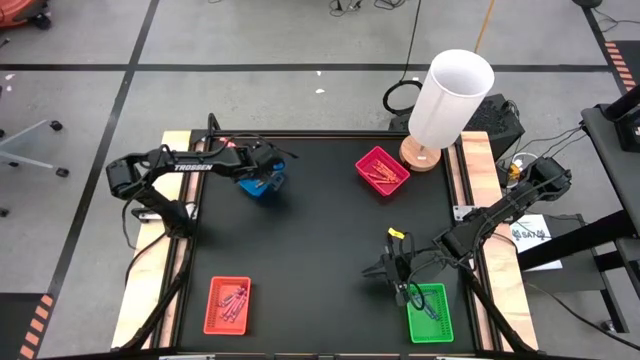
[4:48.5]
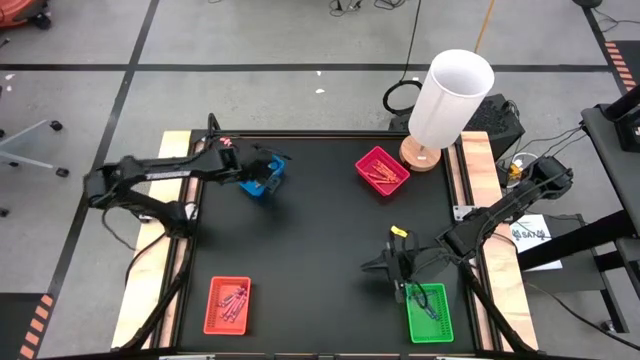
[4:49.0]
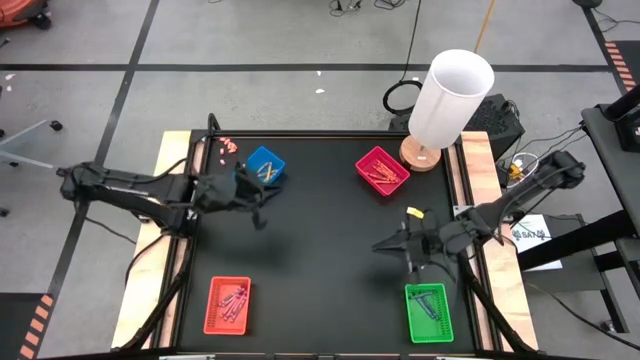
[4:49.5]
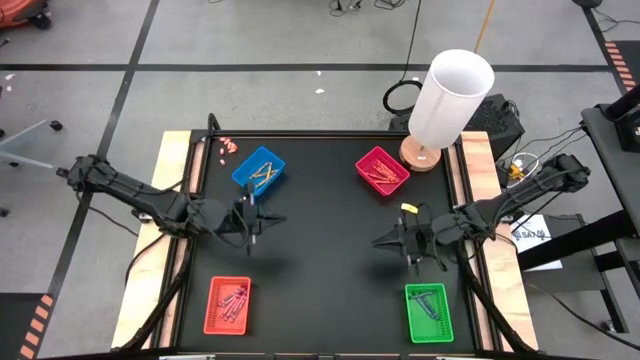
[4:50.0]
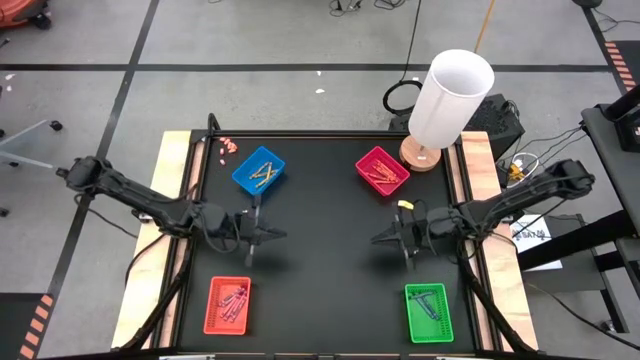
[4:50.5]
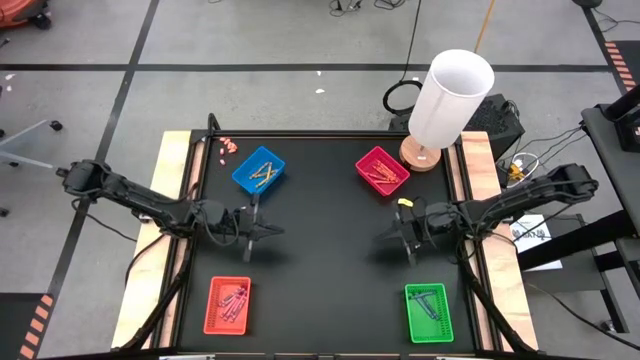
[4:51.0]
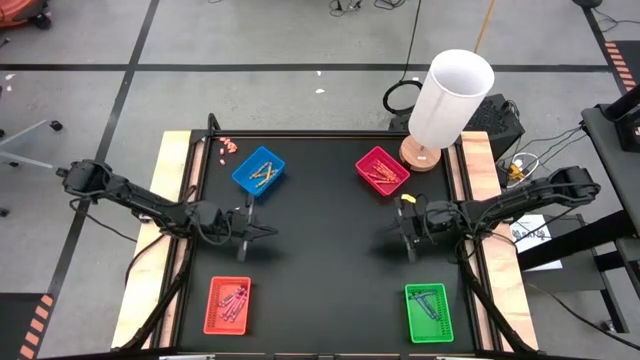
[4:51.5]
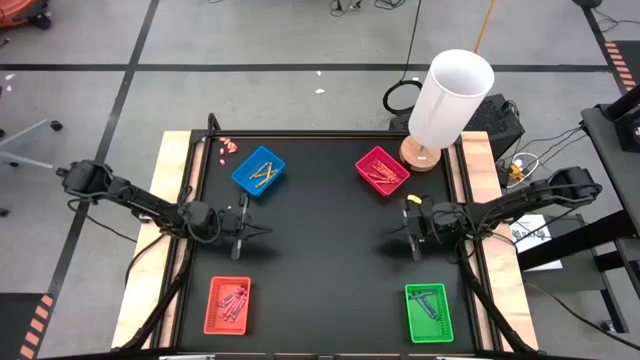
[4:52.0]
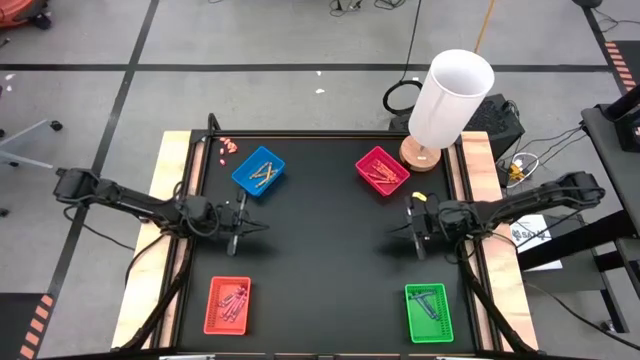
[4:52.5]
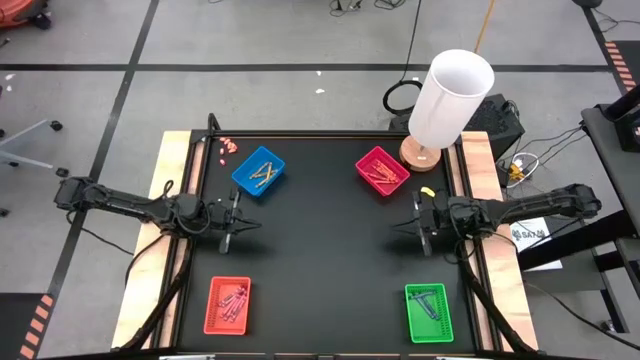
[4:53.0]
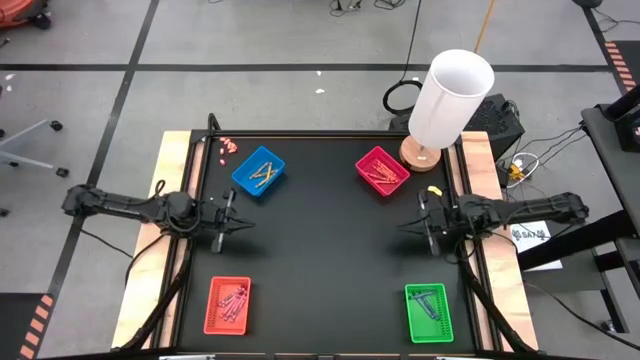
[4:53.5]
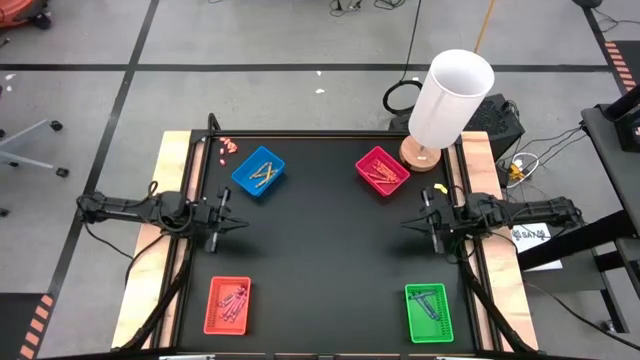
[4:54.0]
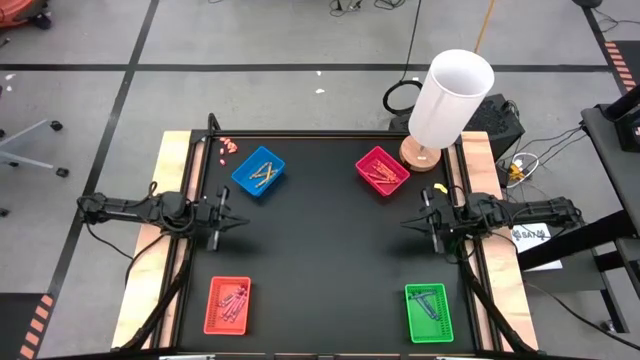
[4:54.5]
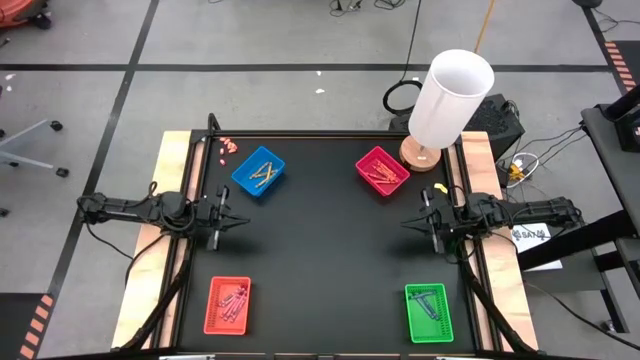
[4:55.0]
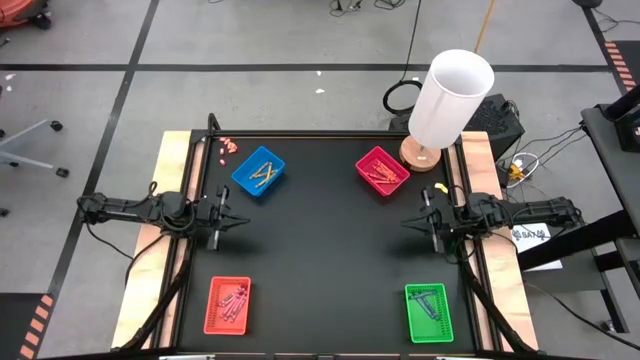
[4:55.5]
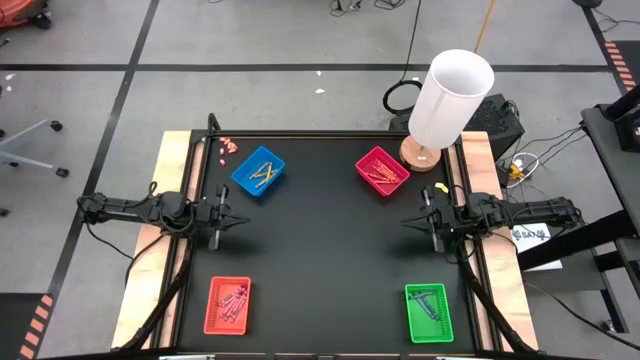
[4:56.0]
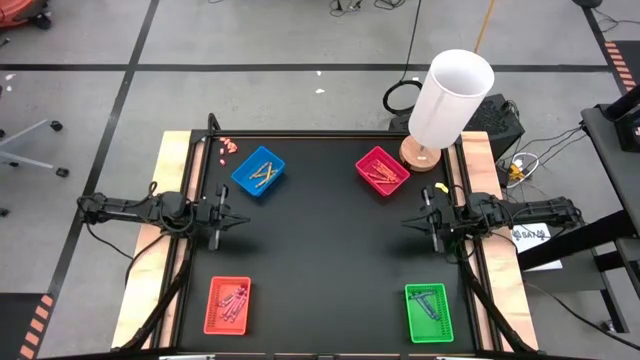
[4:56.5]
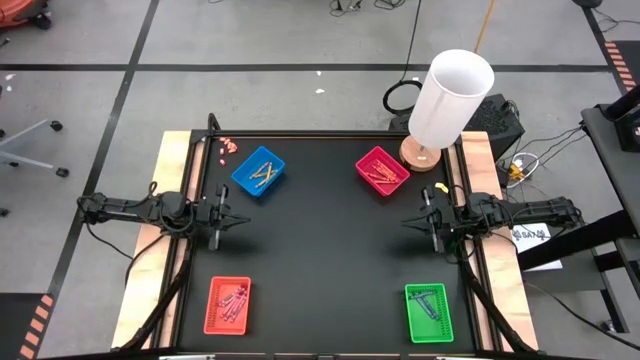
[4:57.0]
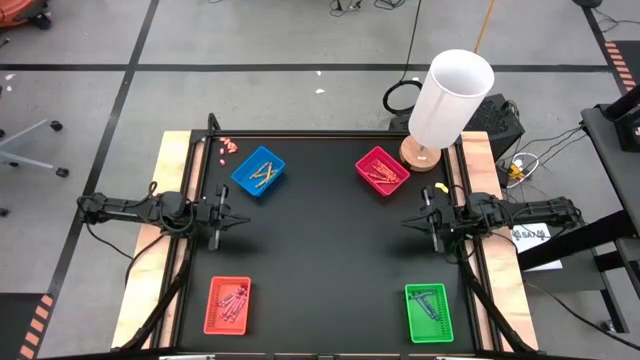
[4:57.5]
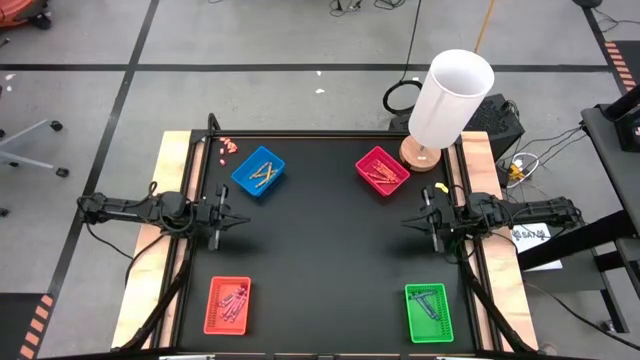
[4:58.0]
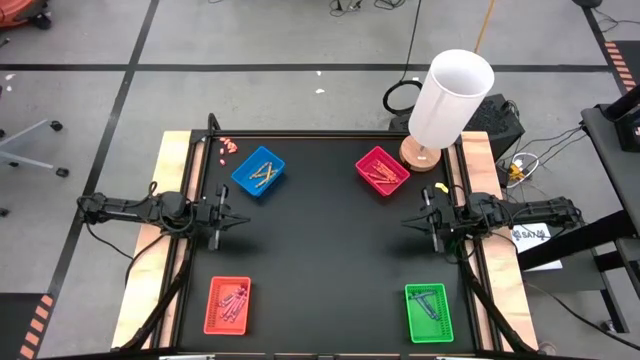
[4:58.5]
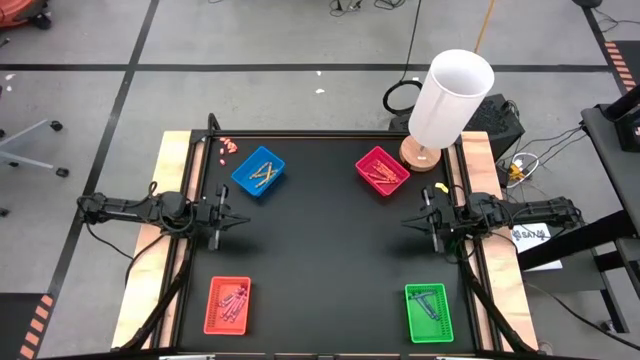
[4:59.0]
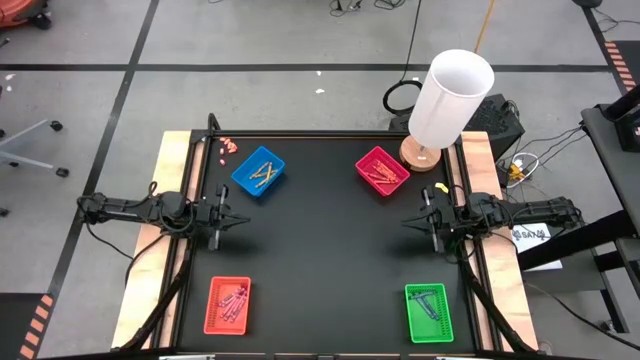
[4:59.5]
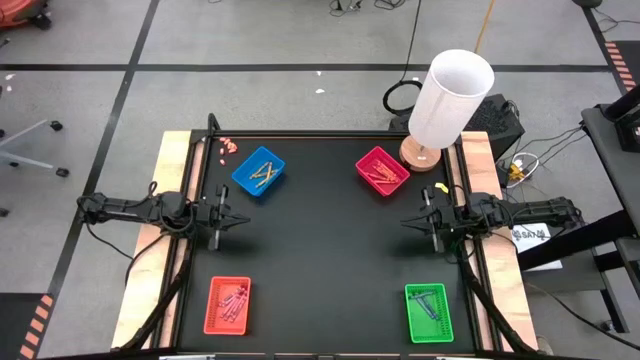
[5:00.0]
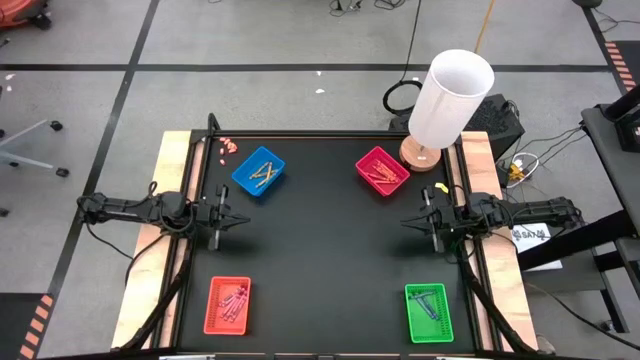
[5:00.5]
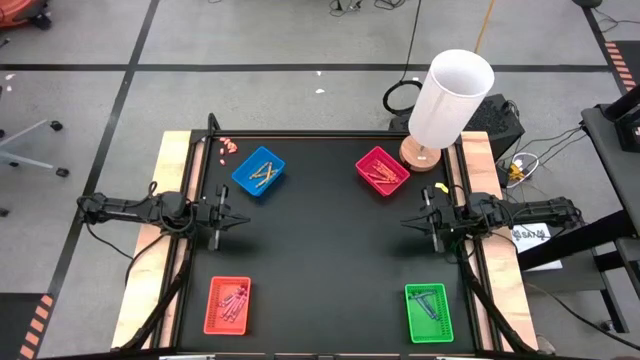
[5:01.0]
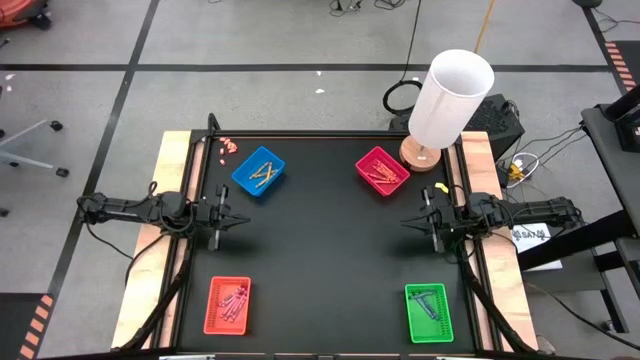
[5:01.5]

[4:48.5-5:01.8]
Task: Sort crayons
Return to Home Position

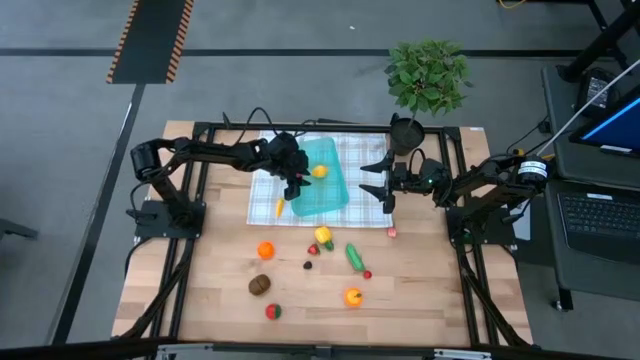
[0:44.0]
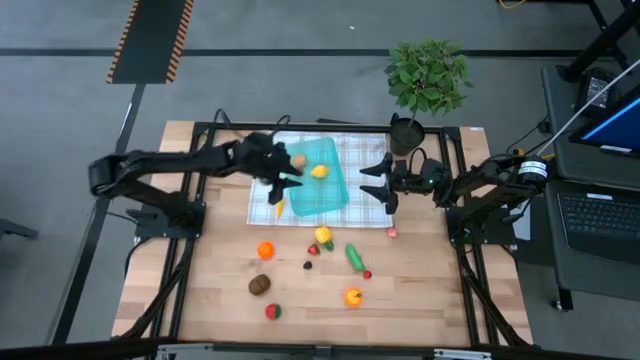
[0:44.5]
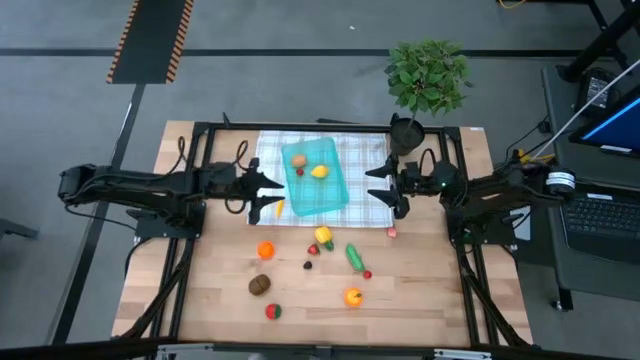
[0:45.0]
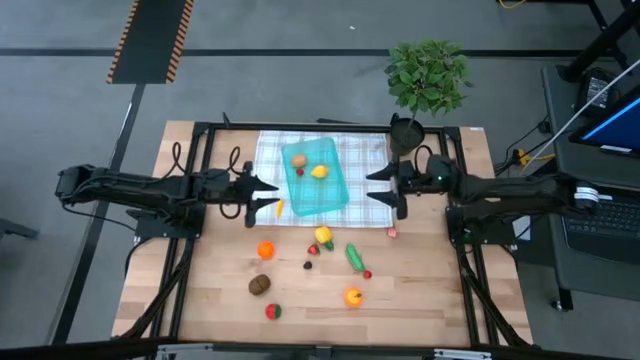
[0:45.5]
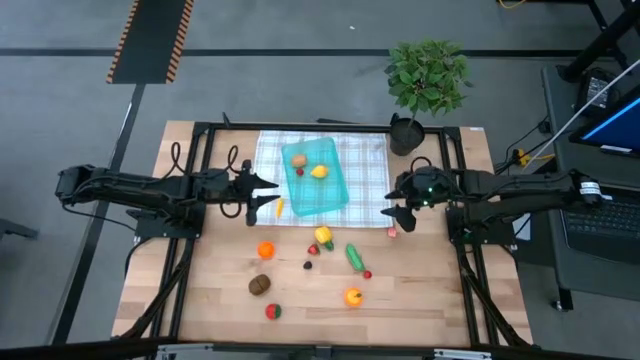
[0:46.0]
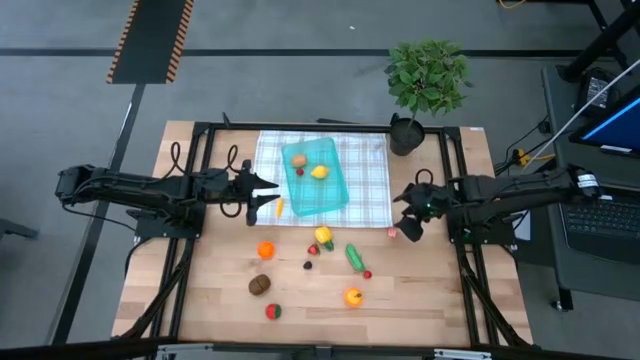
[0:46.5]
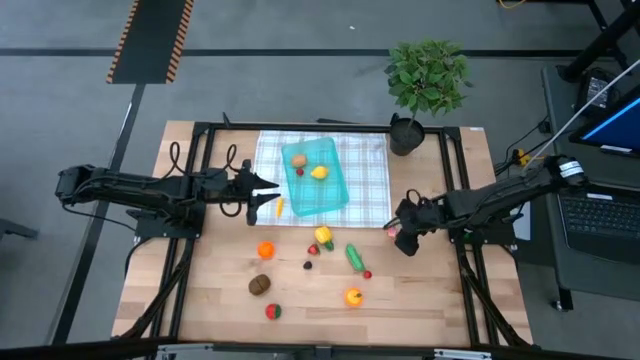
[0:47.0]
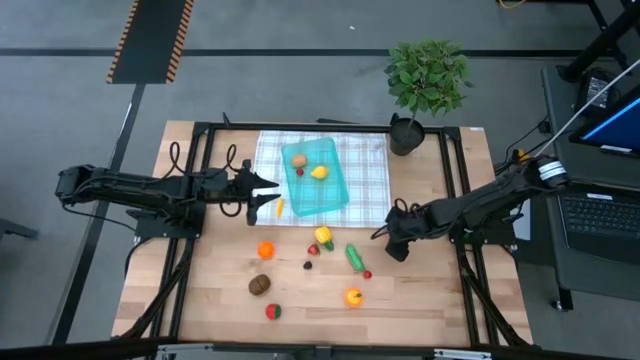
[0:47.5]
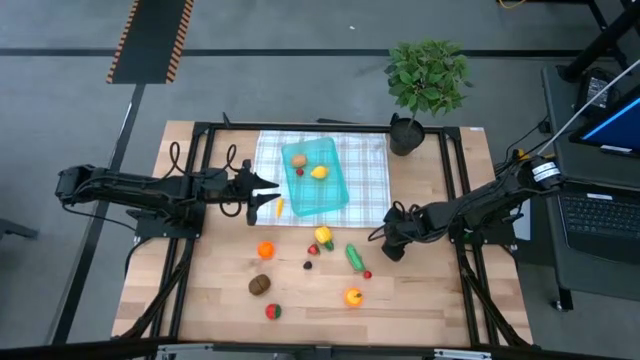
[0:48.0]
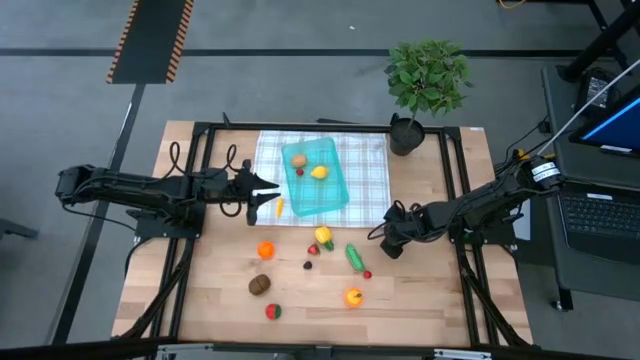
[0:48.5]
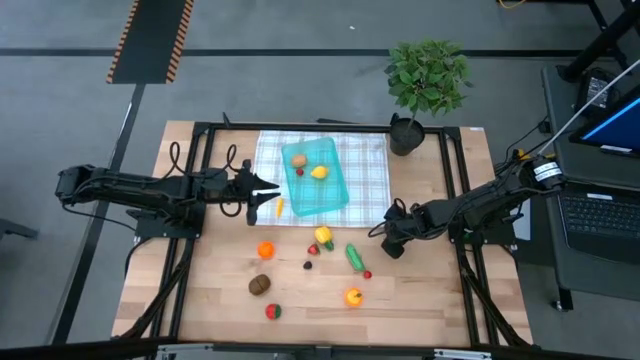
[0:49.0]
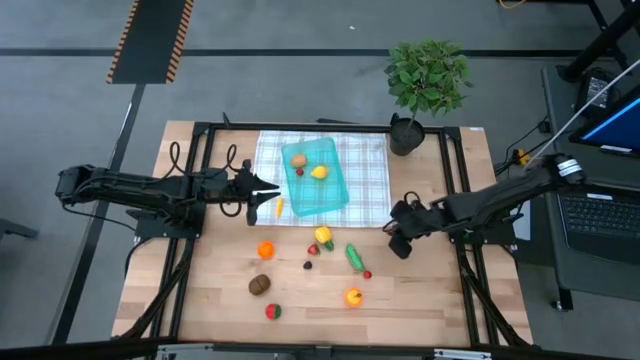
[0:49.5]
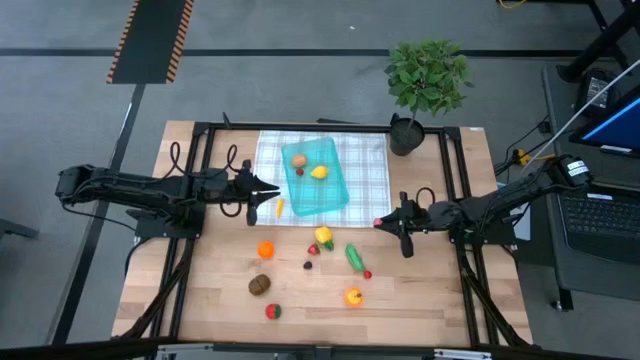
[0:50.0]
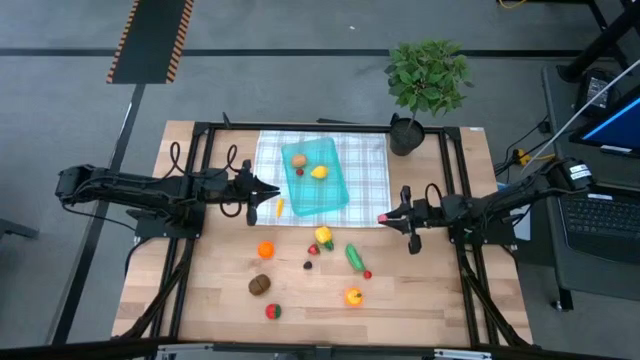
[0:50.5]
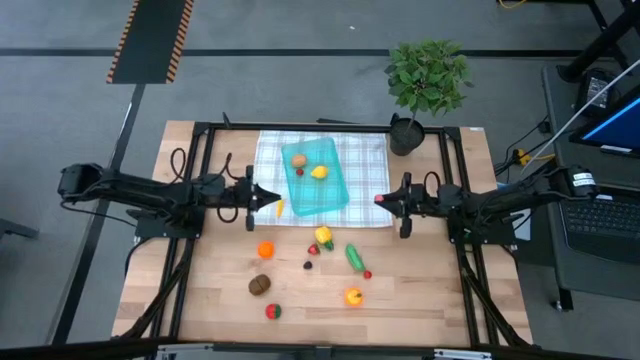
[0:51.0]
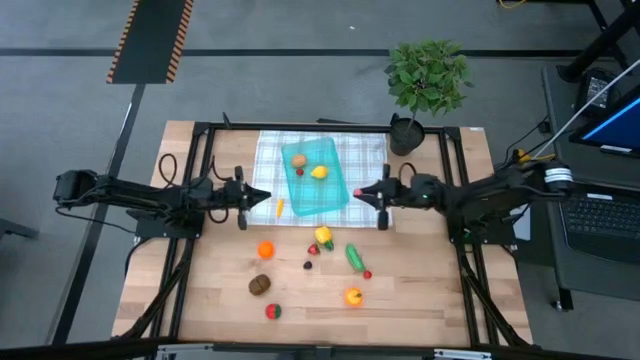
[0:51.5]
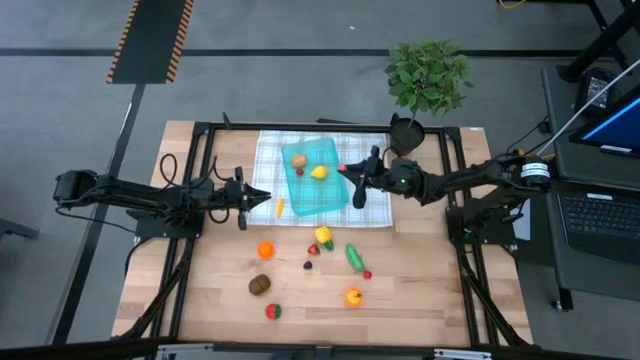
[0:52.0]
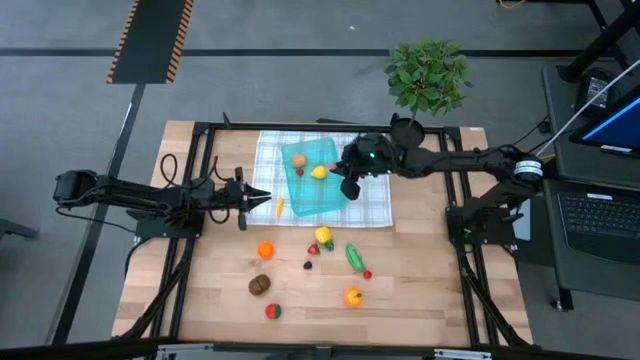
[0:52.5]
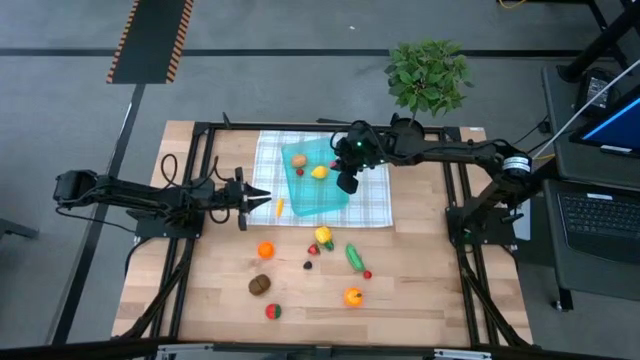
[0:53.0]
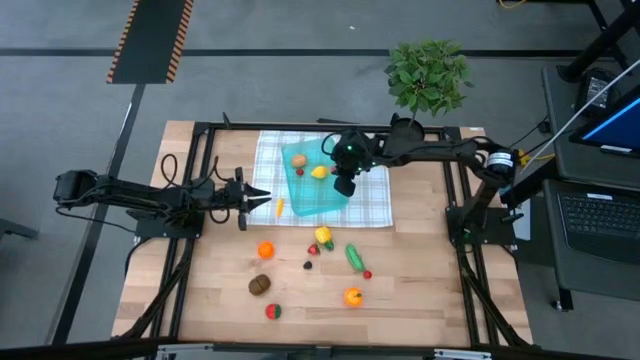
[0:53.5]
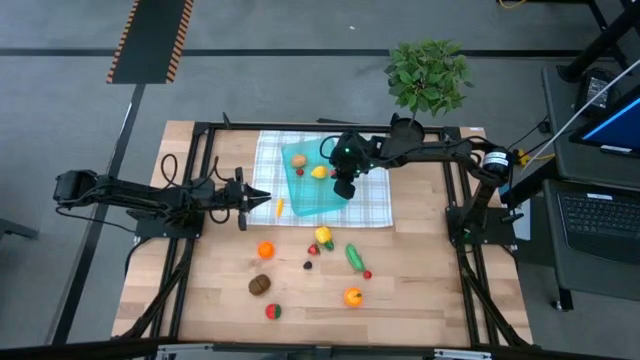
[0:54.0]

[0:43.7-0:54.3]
Task: Pick and placing Produce into tupperware
Put the pink peach into the blue bin
